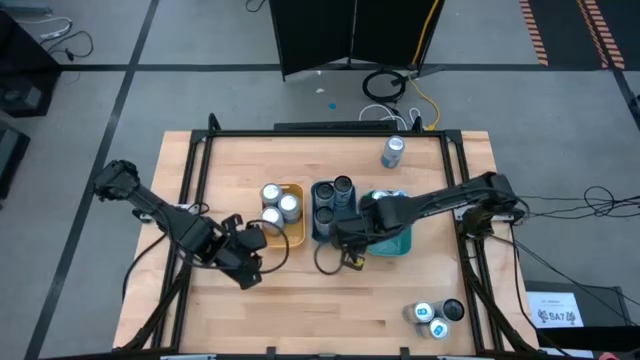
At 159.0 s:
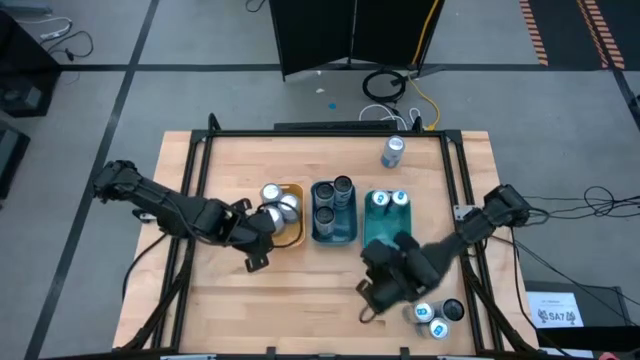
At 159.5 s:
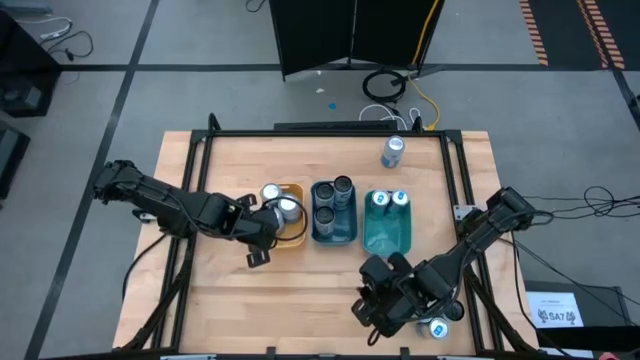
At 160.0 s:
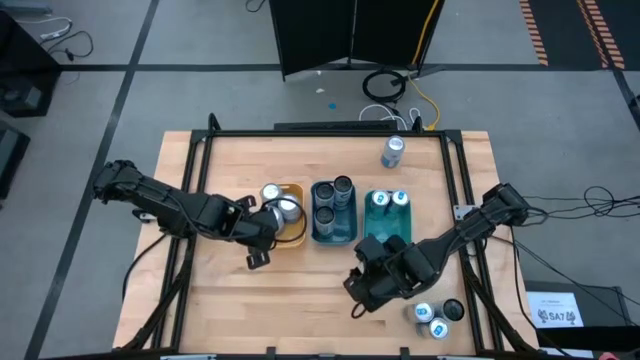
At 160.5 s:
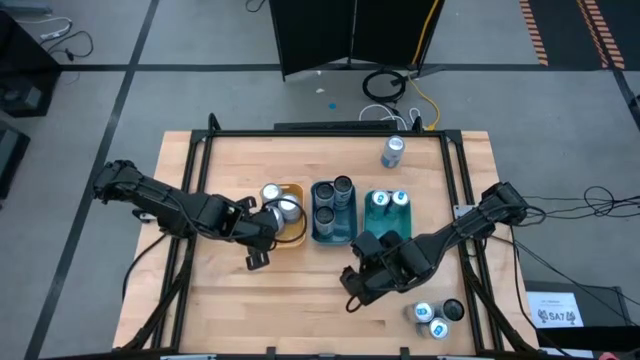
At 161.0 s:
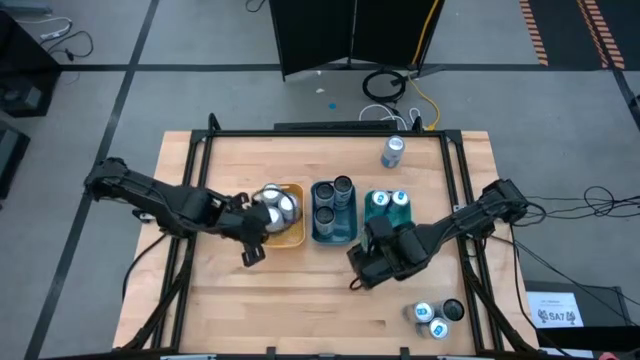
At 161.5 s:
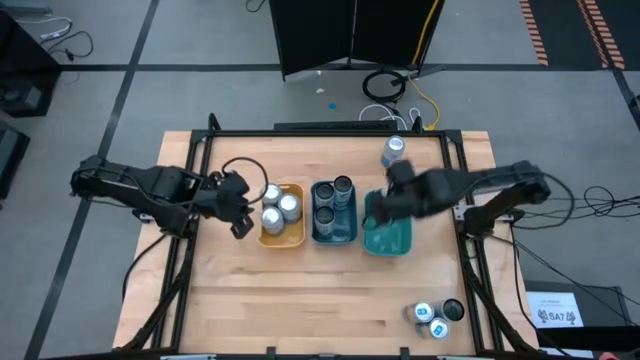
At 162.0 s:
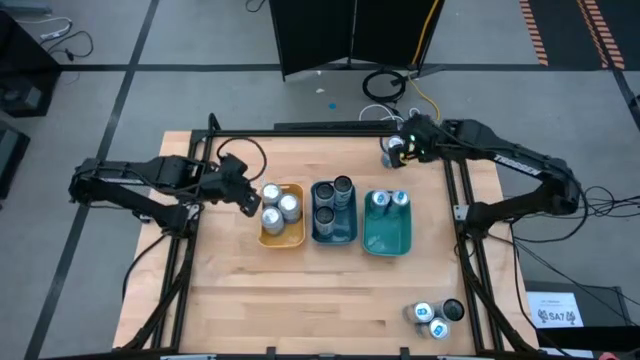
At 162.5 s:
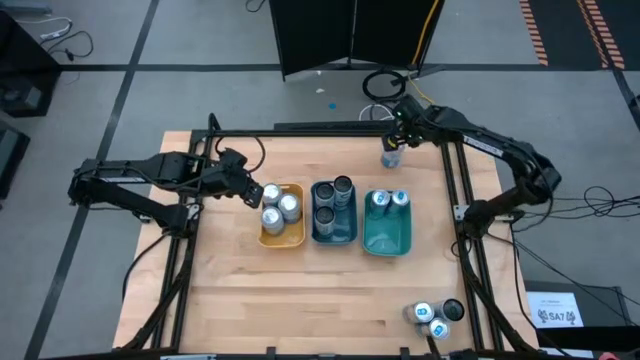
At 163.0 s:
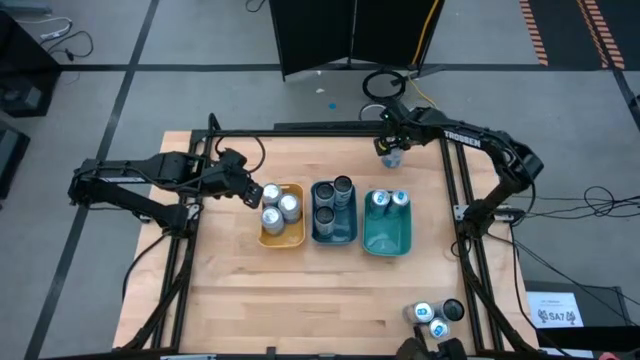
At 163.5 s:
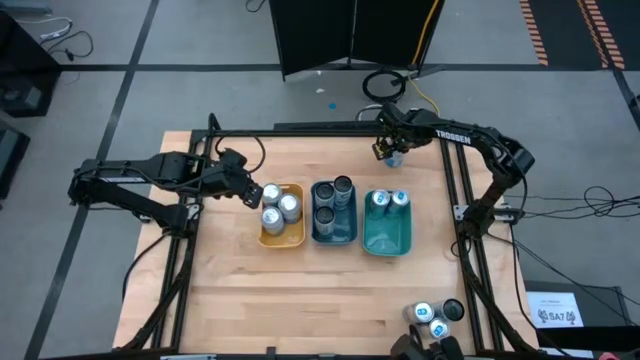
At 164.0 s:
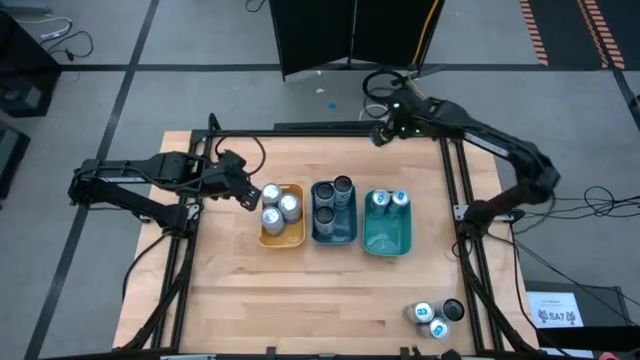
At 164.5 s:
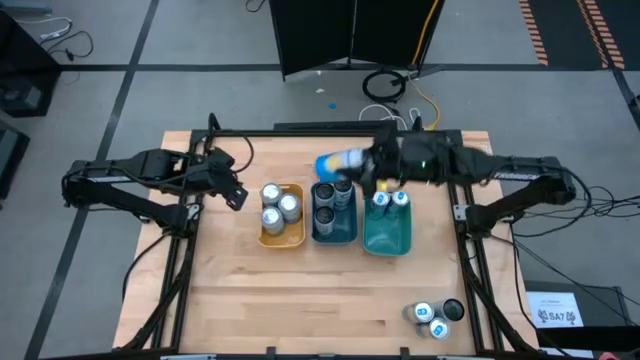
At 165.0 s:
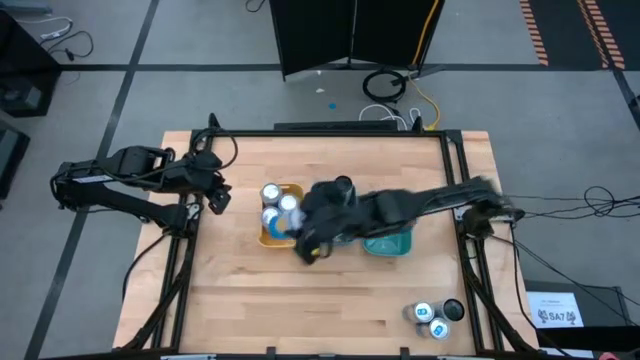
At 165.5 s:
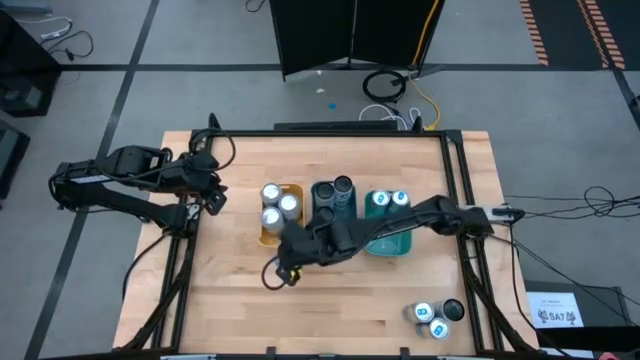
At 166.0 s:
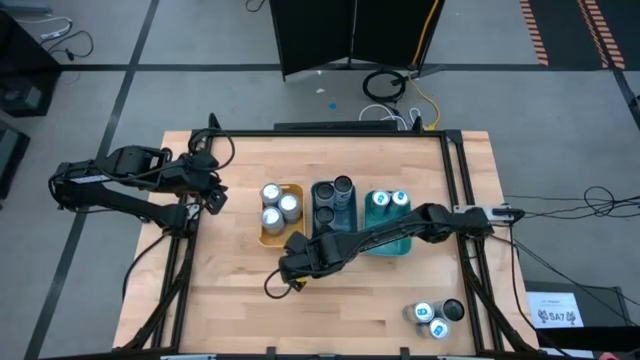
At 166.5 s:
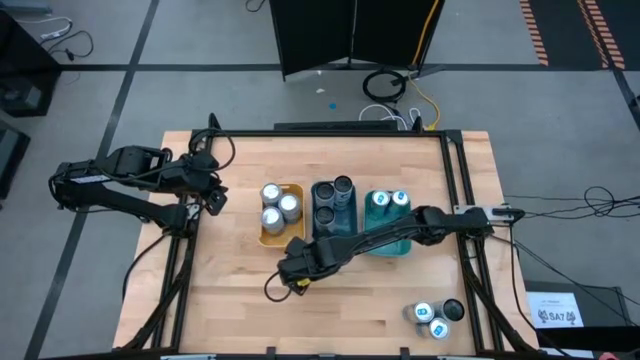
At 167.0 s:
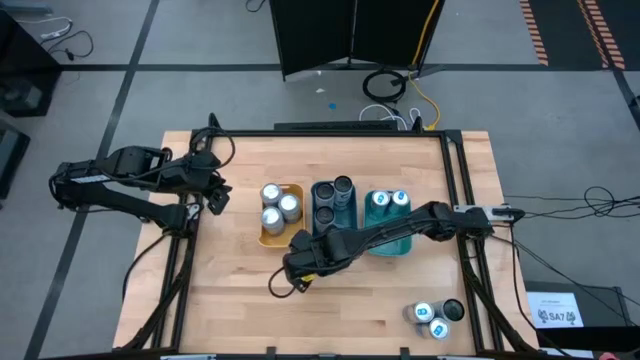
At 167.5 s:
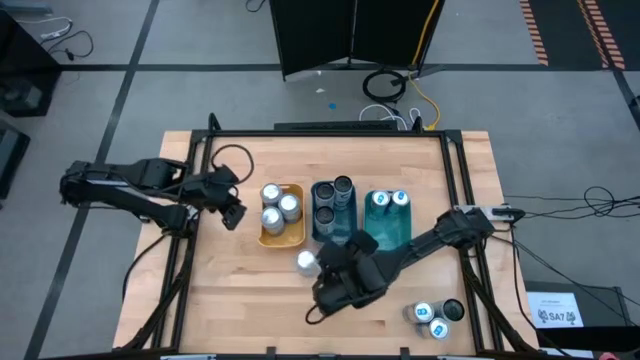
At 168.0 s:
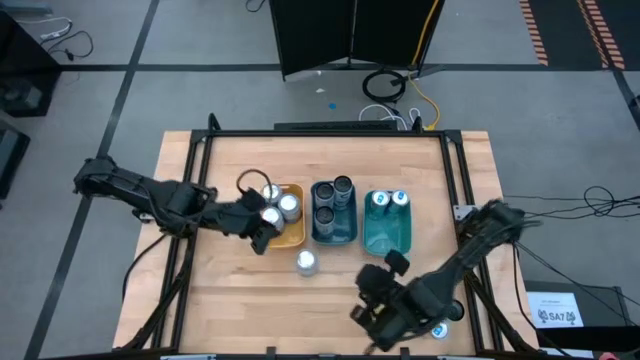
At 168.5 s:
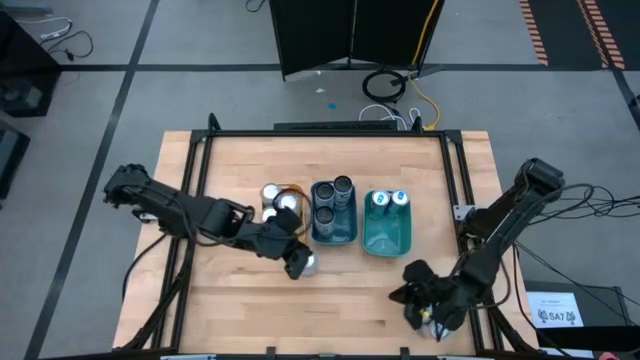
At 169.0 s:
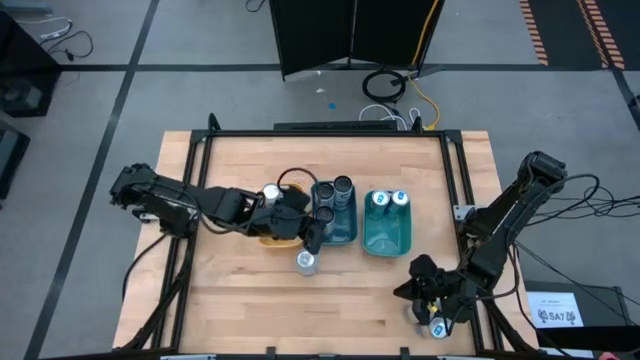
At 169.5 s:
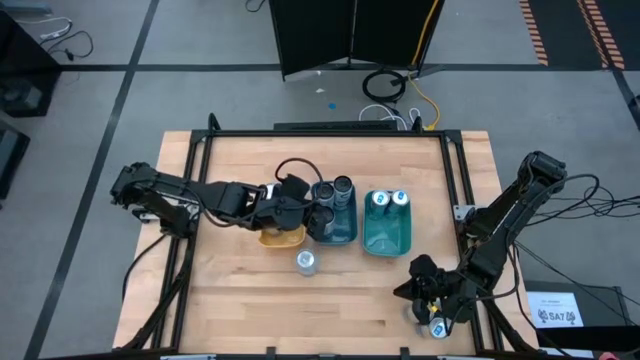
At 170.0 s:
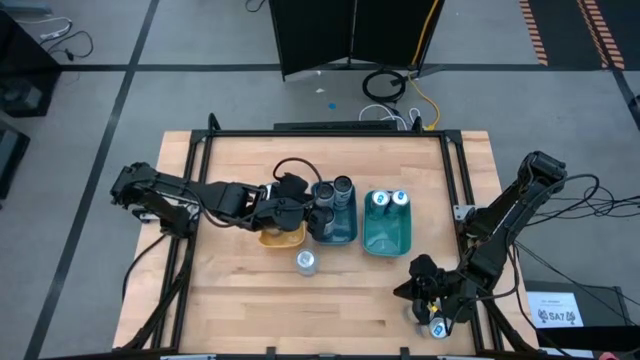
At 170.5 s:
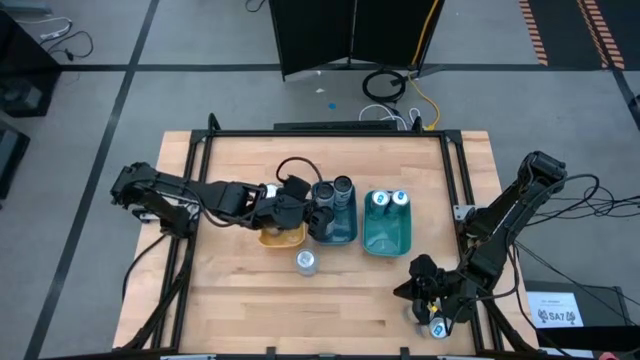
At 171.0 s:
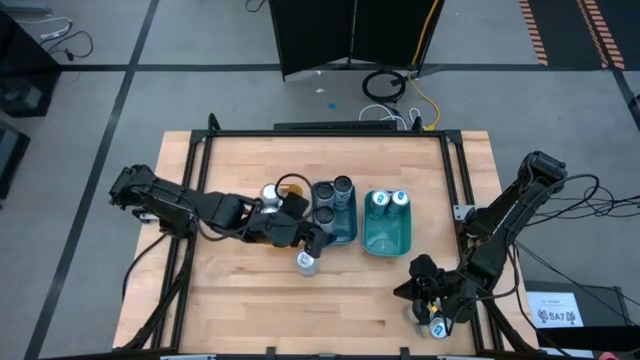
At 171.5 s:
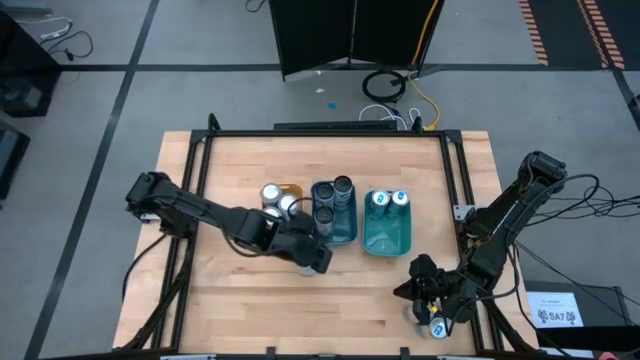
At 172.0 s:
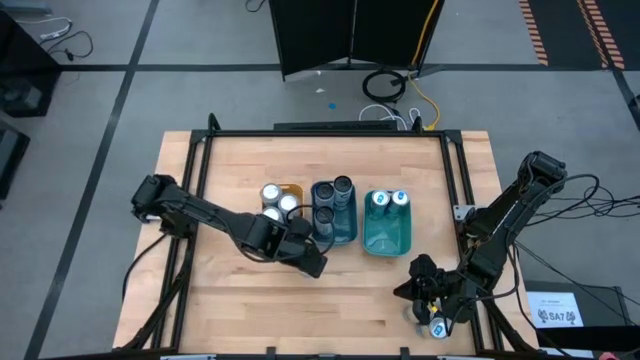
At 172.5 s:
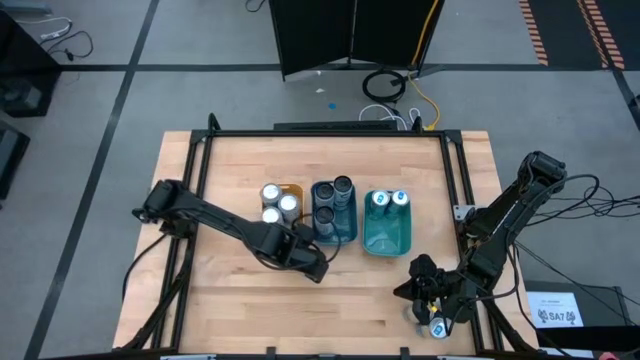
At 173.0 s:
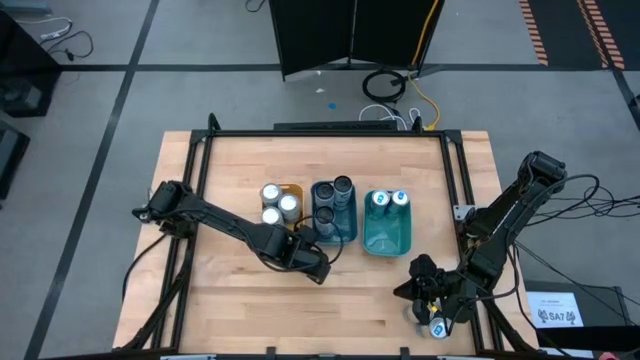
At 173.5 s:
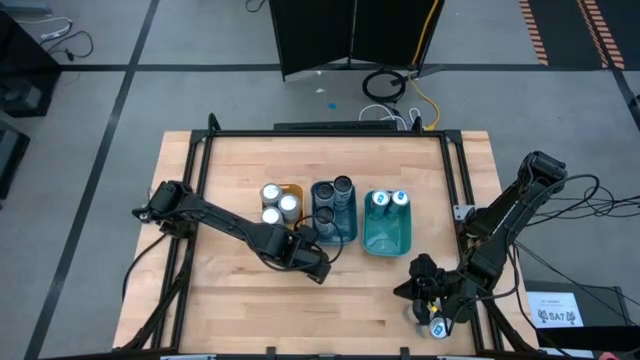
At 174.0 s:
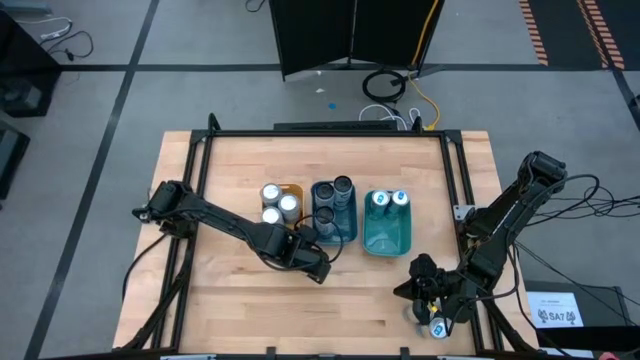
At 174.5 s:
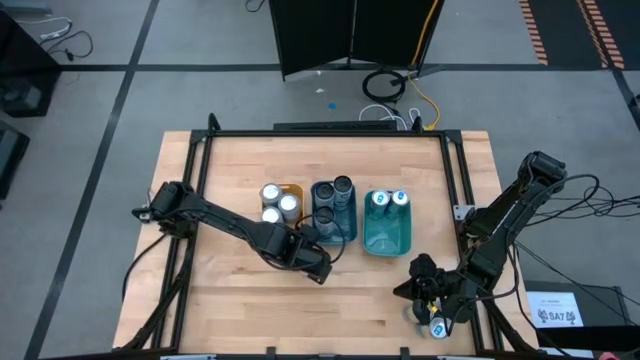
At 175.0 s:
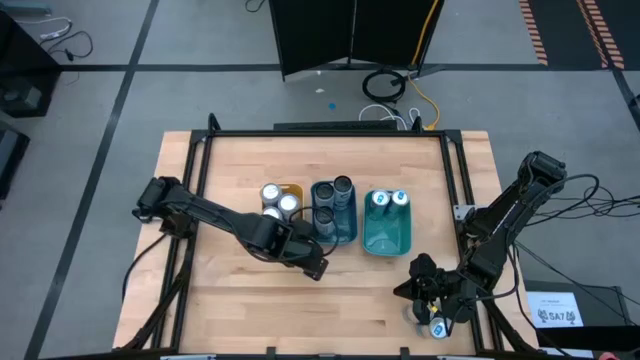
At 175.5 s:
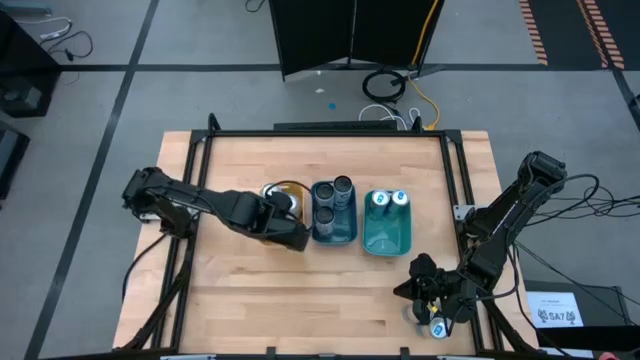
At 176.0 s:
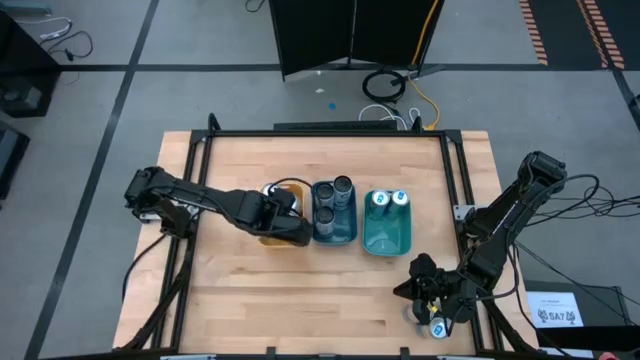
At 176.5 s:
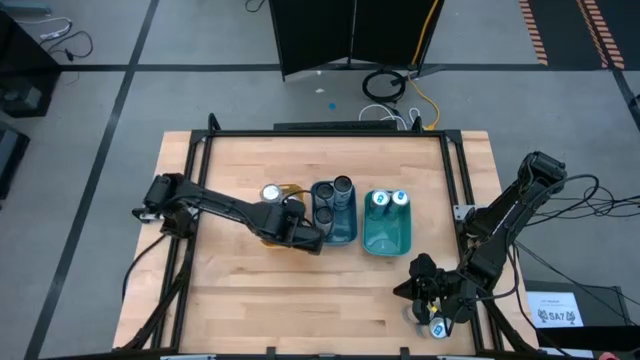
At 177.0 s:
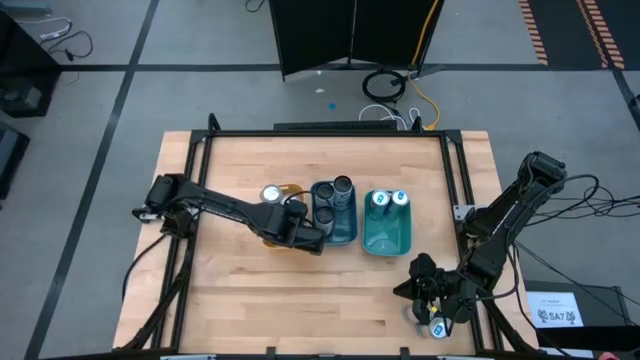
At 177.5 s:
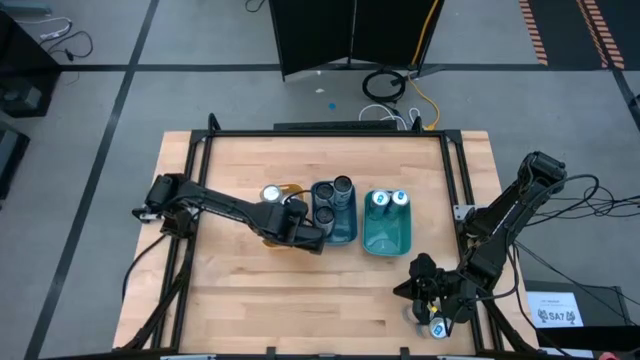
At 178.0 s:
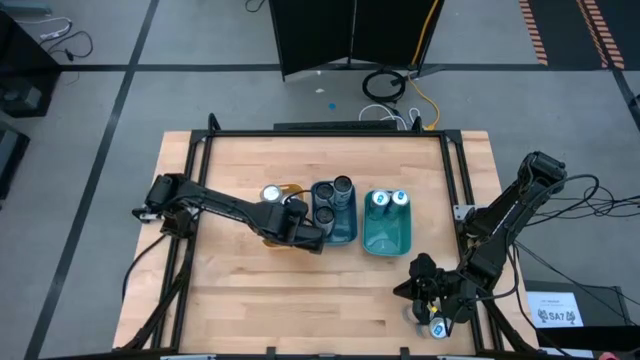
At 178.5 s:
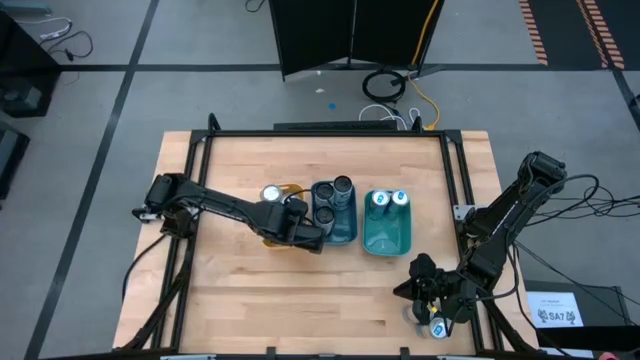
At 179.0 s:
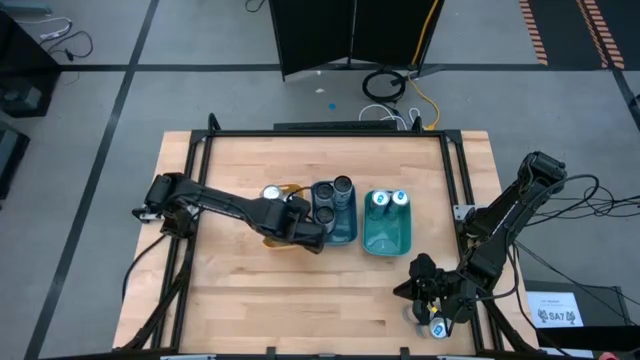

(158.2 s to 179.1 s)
Task: Sort soda cans
Put the blue-white soda can into the yellow bin

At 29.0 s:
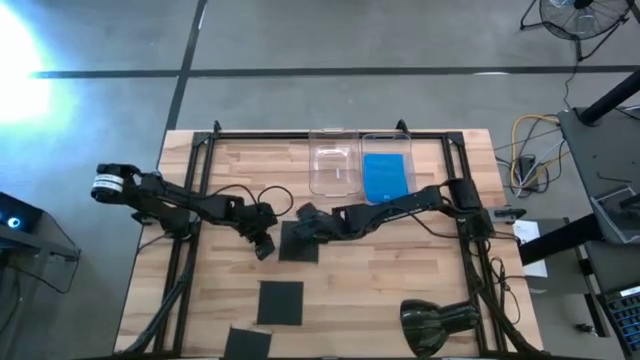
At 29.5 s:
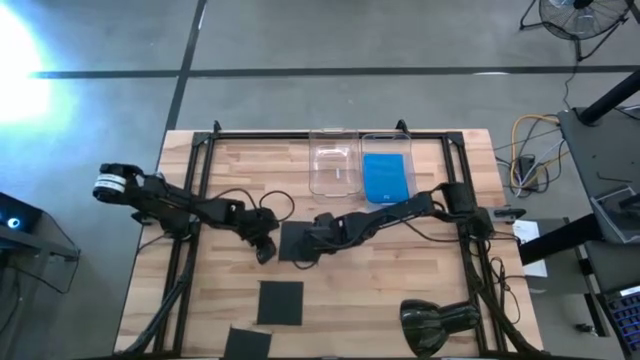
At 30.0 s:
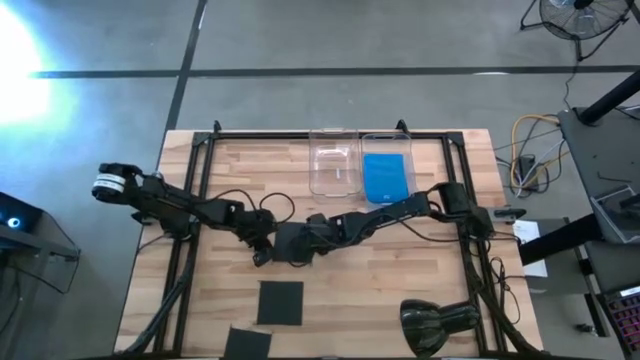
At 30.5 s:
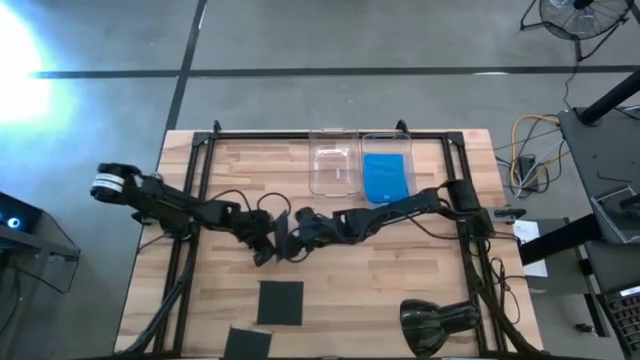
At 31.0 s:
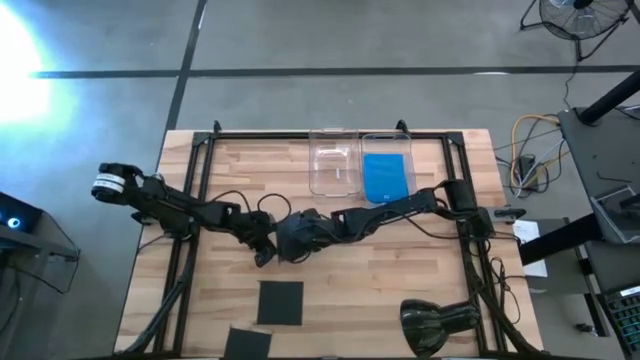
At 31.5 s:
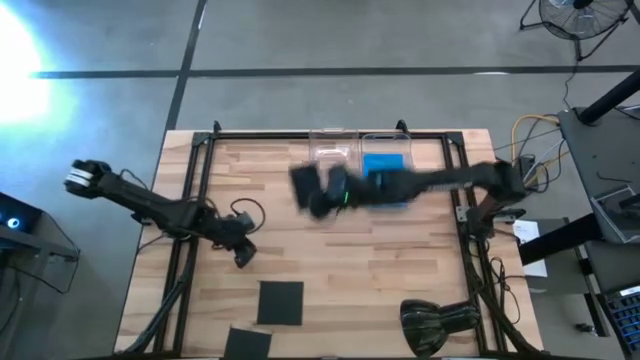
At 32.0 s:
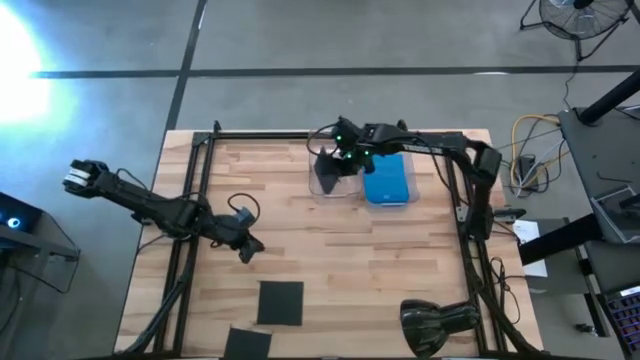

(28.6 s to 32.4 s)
Task: Pick & place jewel cases by type
Put the top black CD case into the left transparent bin
